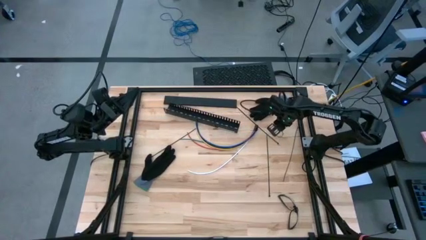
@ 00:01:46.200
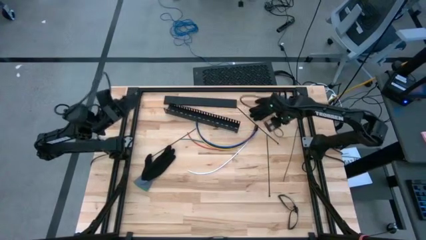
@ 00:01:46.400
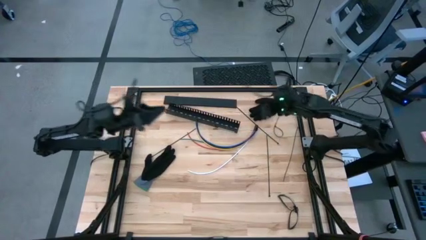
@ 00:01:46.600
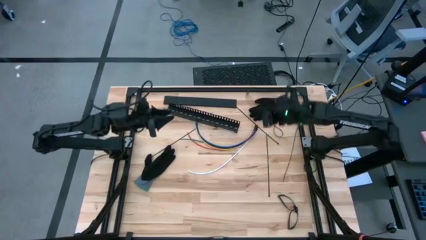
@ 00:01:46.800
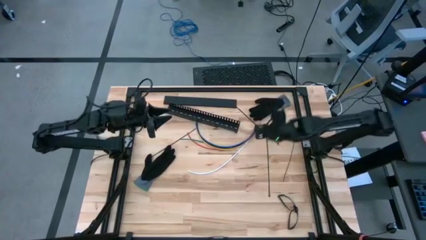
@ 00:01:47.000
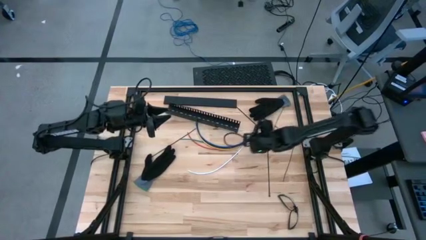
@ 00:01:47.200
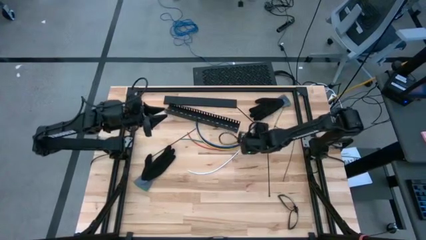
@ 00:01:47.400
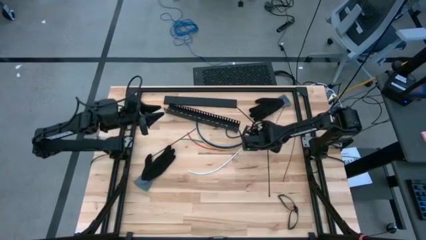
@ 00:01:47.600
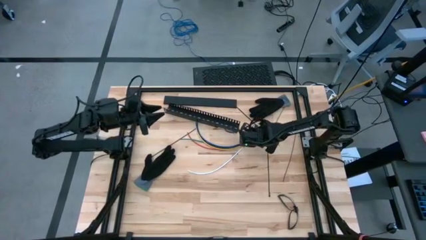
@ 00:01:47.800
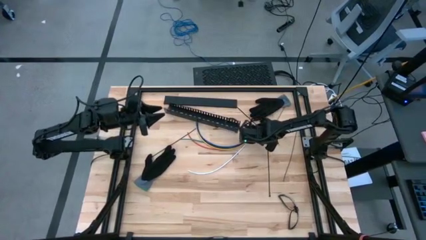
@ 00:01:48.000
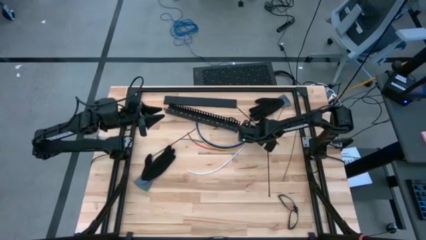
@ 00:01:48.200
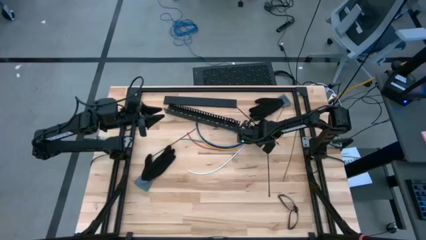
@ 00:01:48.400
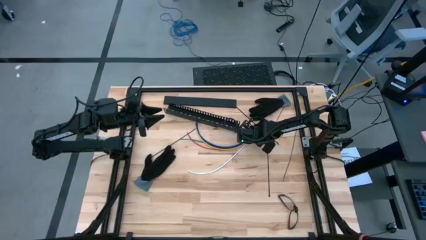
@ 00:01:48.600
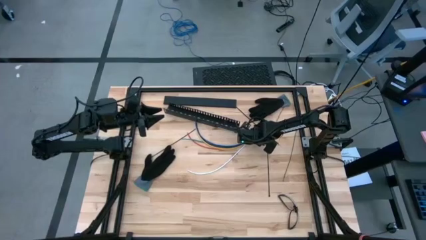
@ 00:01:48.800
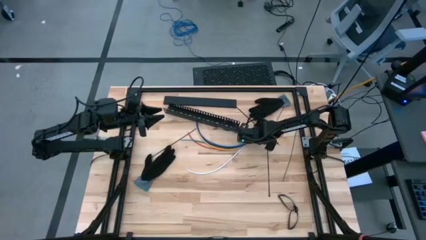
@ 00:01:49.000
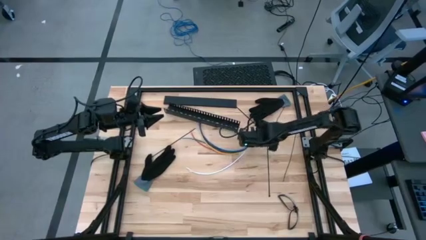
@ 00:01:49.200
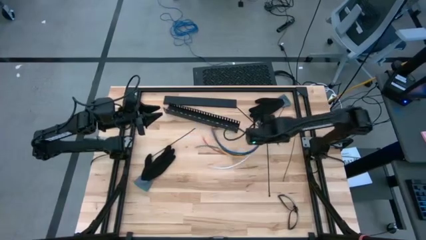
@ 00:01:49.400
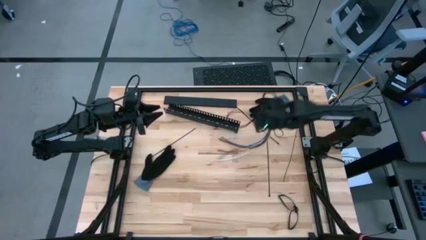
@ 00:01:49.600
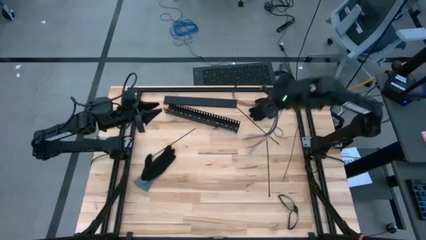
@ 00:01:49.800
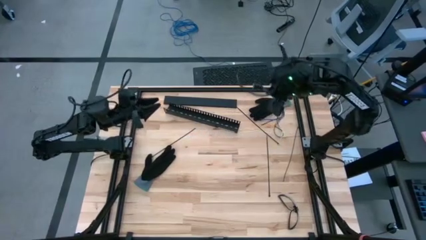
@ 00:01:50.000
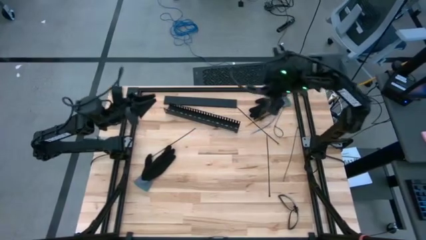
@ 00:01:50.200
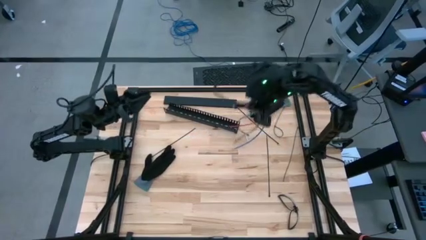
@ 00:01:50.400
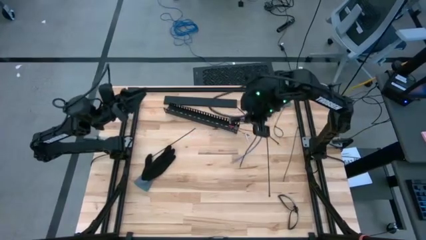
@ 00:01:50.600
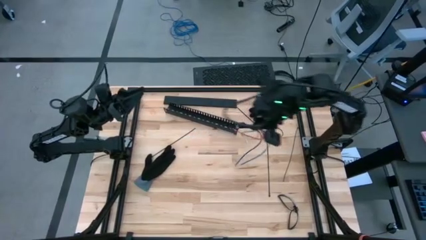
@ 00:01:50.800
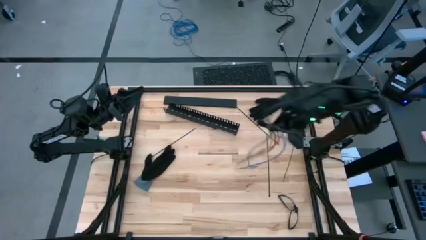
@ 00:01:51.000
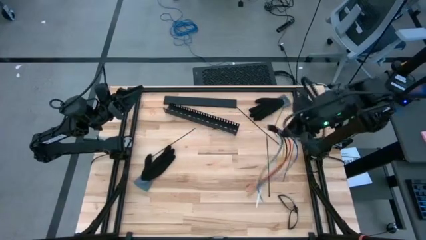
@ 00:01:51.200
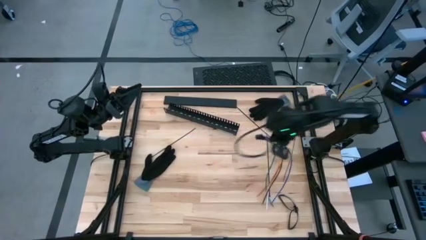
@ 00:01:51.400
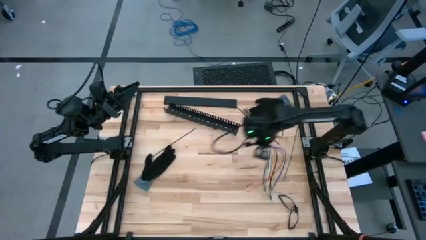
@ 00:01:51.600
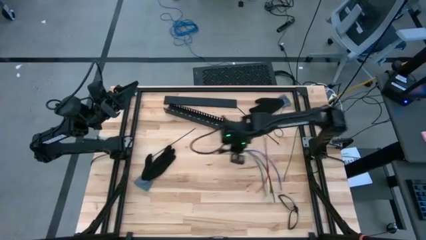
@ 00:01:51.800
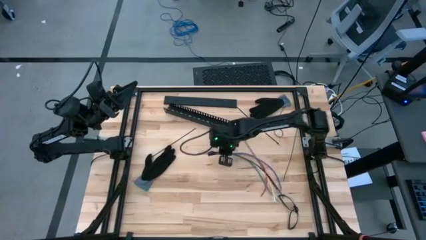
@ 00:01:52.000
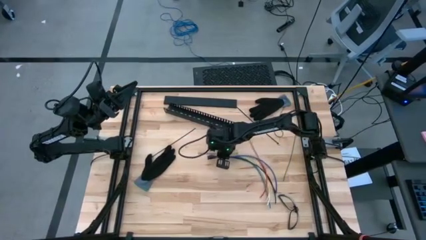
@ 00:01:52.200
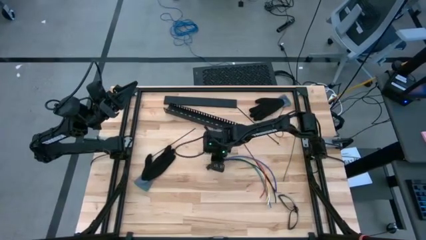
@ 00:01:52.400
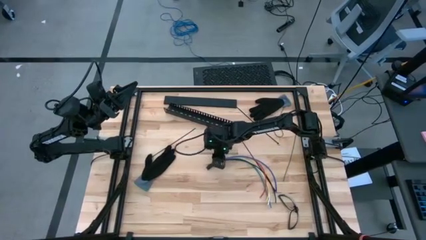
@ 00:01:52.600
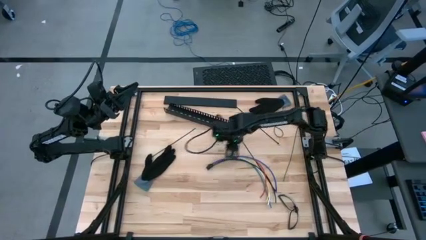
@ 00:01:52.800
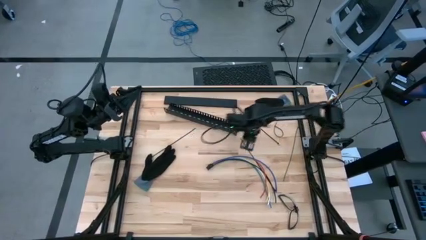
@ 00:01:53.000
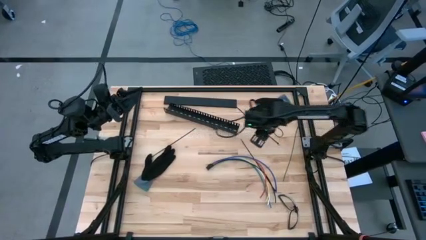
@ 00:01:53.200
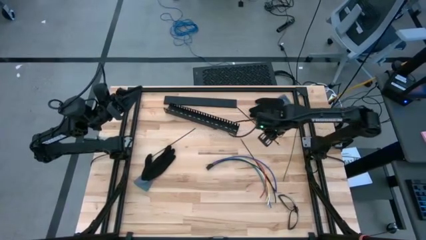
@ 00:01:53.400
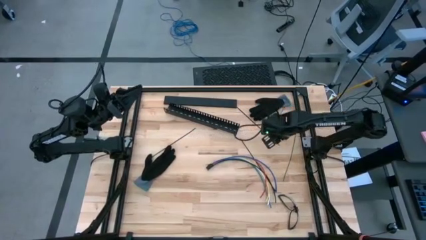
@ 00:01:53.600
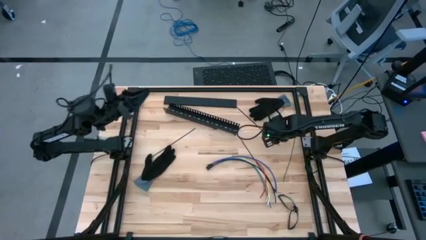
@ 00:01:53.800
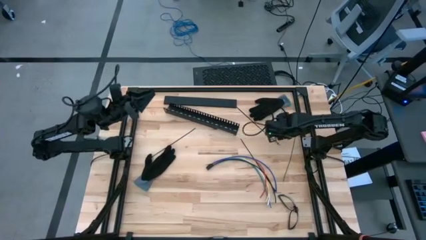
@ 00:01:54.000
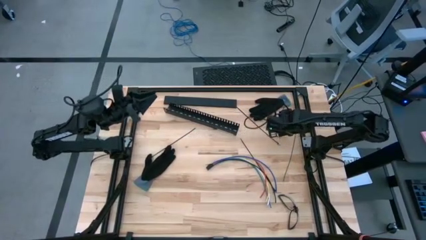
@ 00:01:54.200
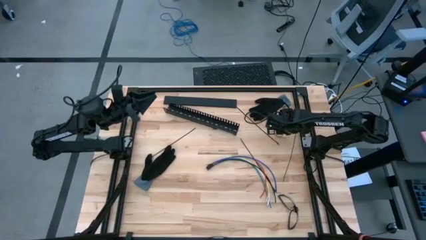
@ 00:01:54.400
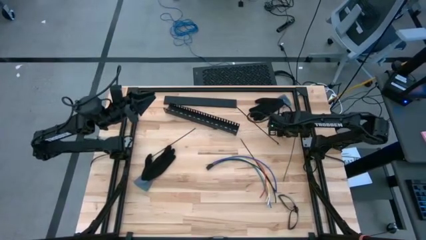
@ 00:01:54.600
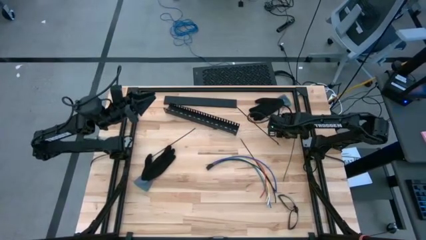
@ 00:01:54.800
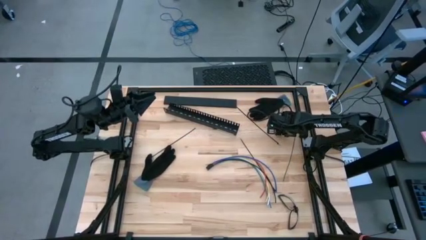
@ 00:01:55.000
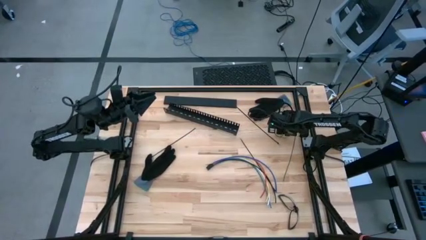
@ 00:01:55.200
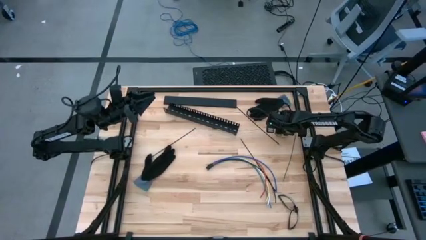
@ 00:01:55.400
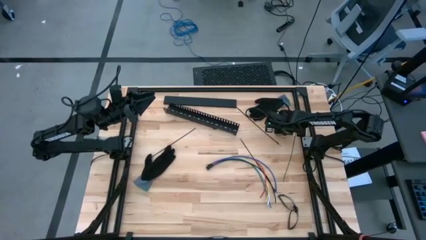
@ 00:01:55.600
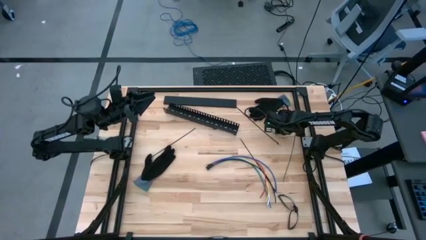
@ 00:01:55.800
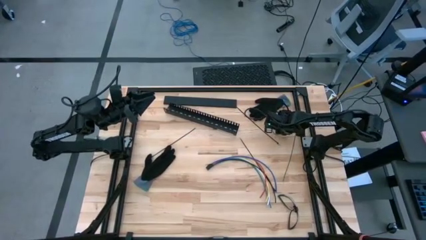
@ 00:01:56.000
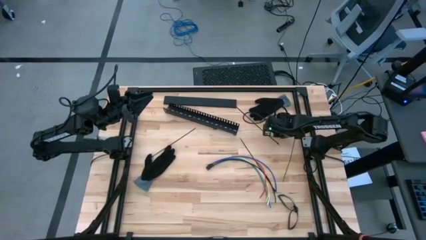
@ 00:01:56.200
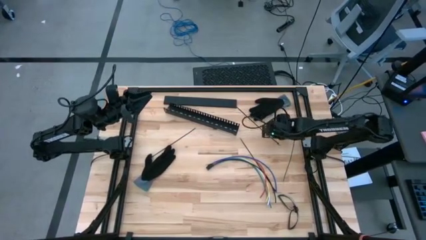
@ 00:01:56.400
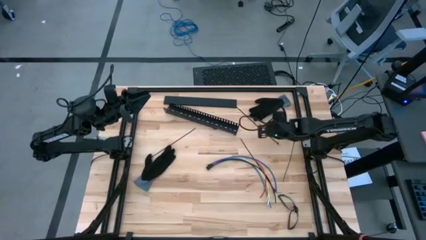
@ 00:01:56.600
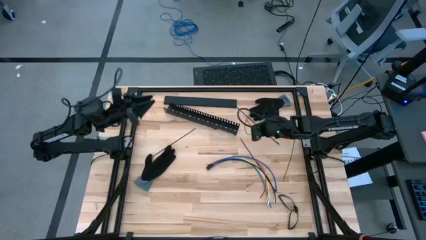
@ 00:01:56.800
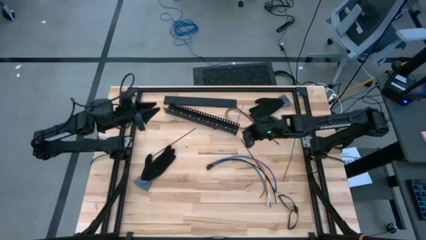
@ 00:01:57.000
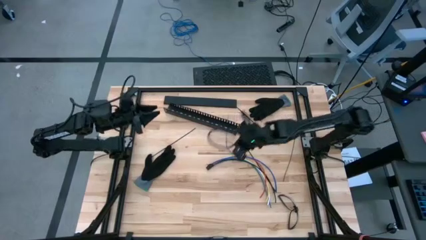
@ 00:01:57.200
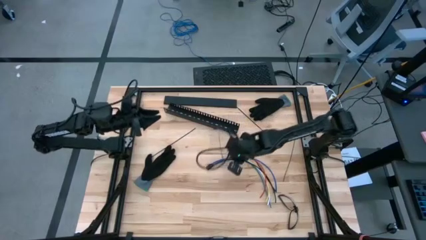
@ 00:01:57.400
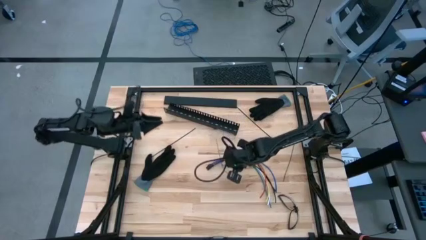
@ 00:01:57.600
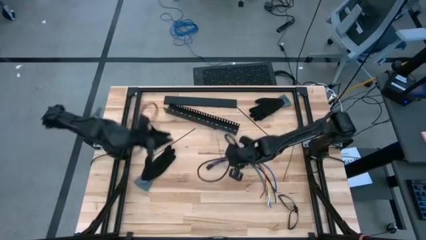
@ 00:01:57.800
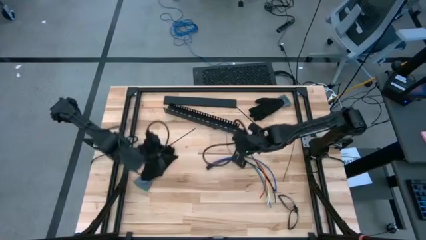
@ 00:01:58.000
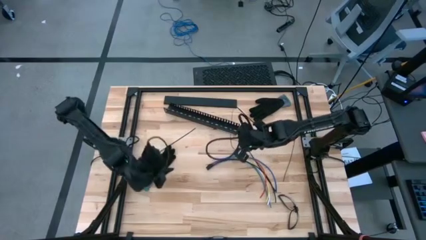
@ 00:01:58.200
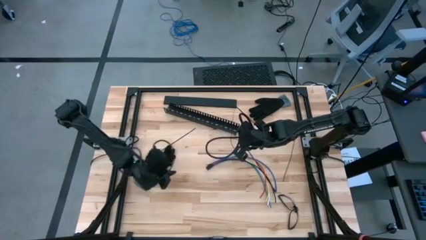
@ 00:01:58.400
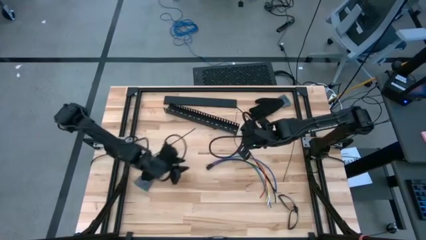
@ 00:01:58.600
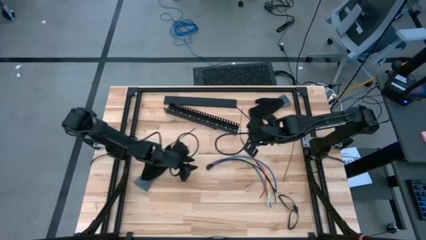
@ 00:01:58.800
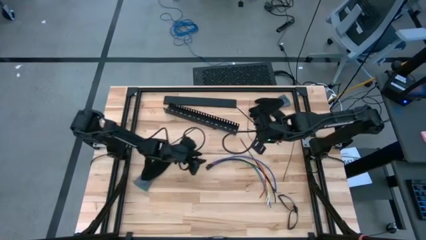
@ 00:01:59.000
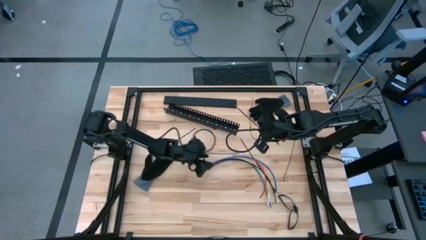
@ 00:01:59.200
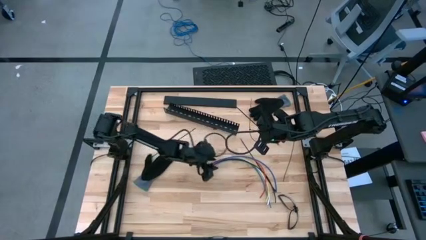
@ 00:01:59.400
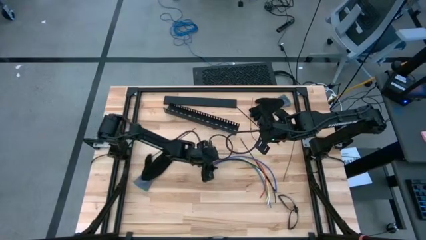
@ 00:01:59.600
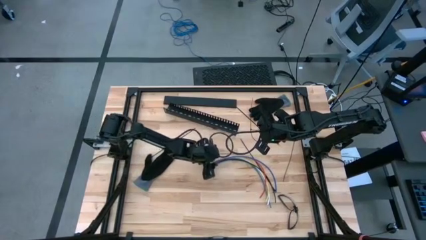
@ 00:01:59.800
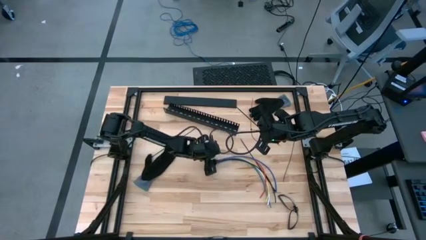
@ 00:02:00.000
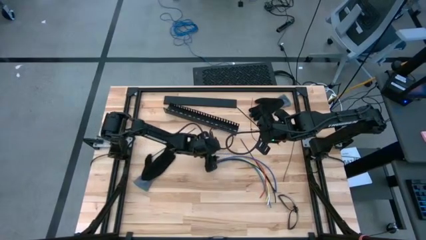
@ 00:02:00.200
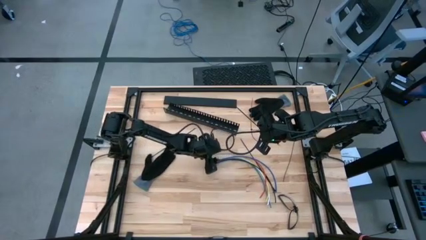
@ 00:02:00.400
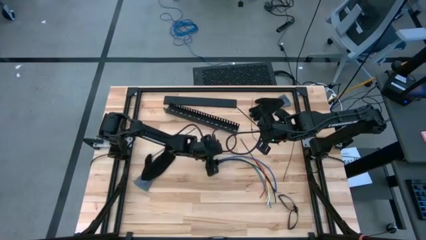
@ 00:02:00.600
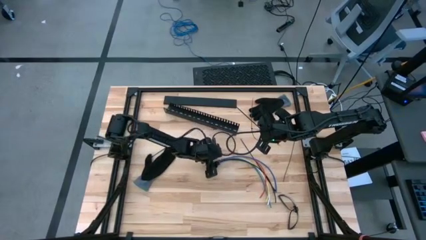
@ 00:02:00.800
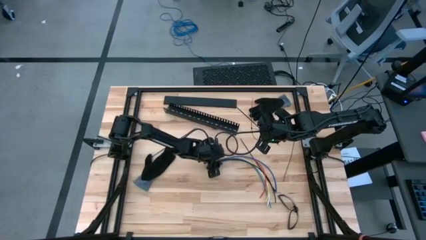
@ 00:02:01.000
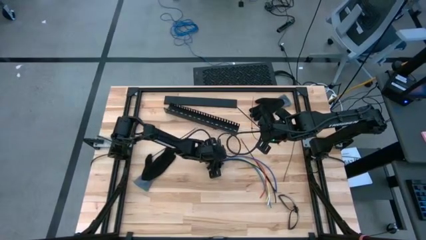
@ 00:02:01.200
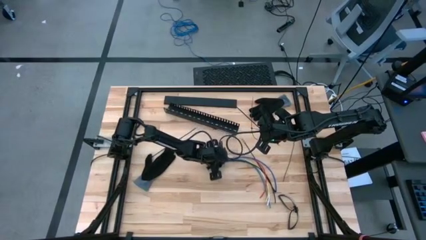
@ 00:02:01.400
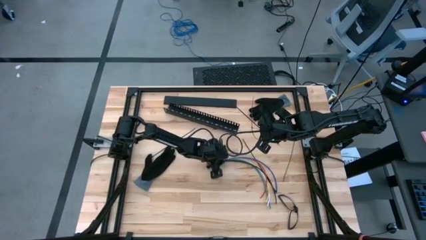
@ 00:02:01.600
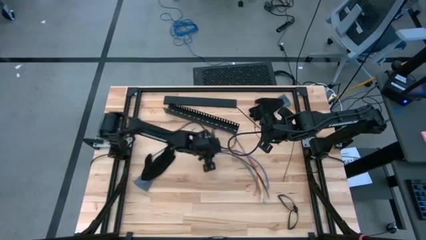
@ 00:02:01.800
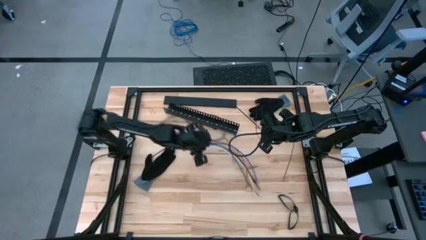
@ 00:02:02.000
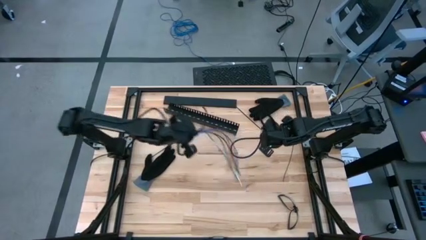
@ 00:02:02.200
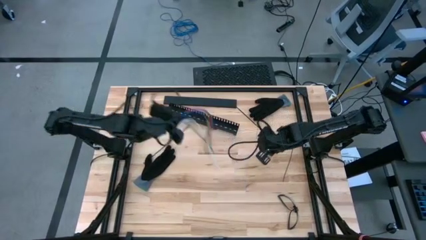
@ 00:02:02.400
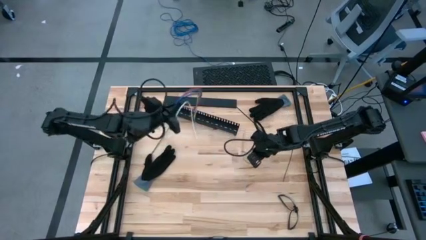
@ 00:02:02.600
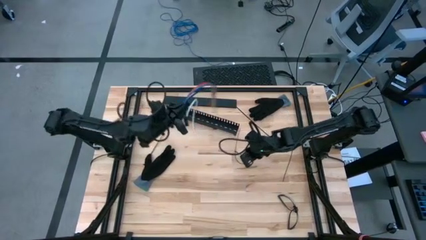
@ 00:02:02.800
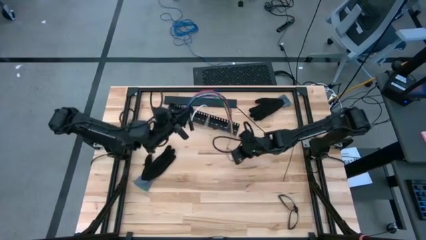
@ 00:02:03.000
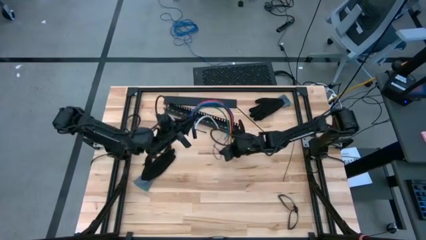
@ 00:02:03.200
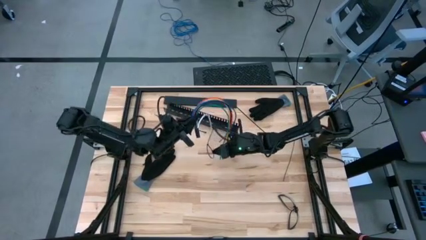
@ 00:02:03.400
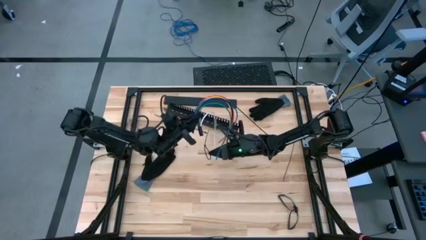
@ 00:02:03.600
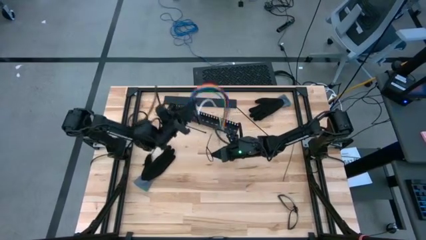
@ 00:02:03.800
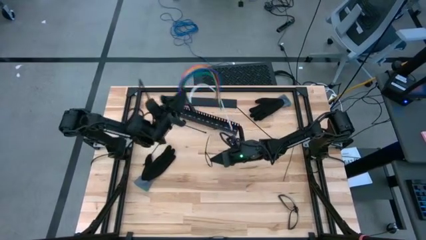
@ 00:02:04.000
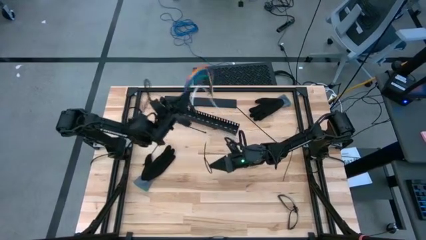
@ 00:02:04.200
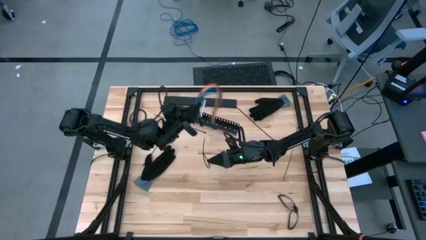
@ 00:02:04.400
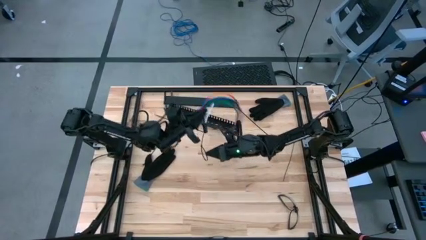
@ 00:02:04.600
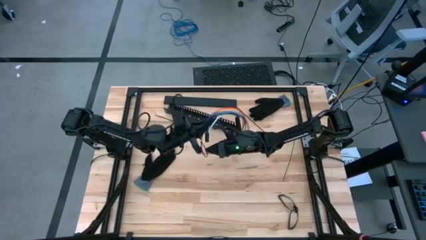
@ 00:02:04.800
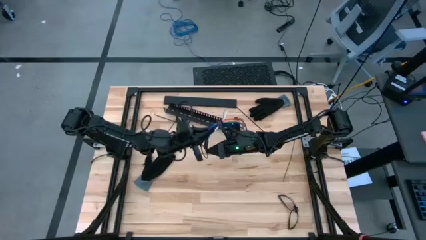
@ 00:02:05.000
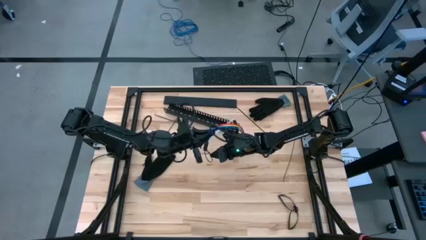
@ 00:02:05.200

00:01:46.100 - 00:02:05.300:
Task: Ziptie cables
Wrap the cable wires using a zip tie
